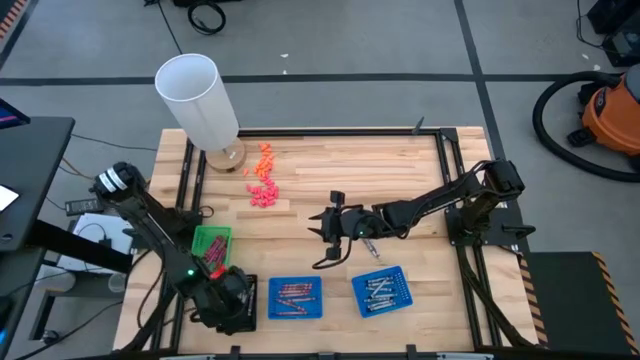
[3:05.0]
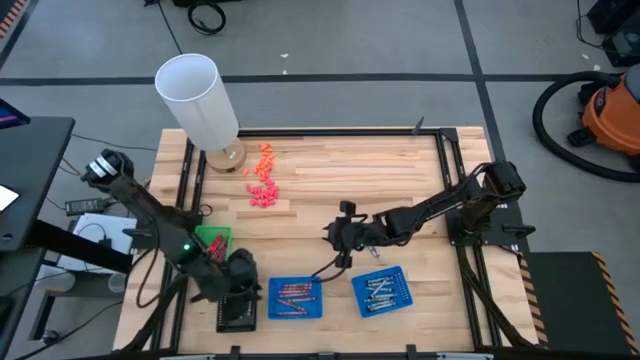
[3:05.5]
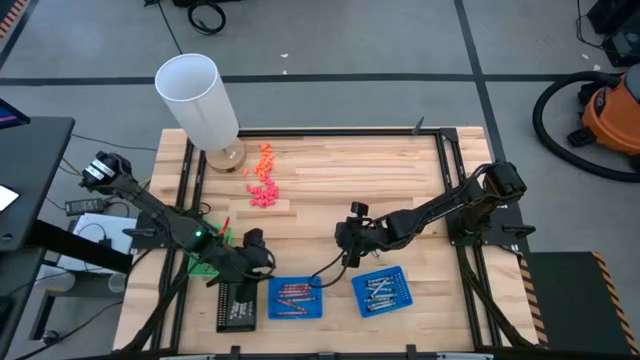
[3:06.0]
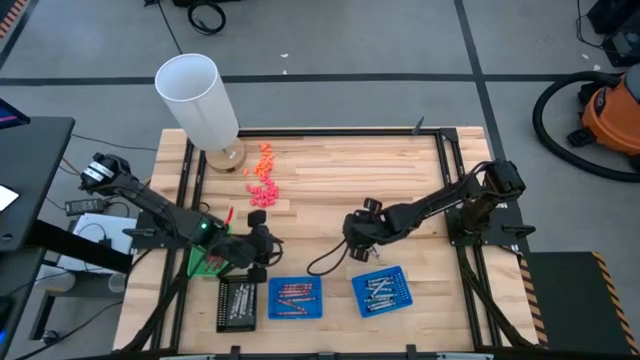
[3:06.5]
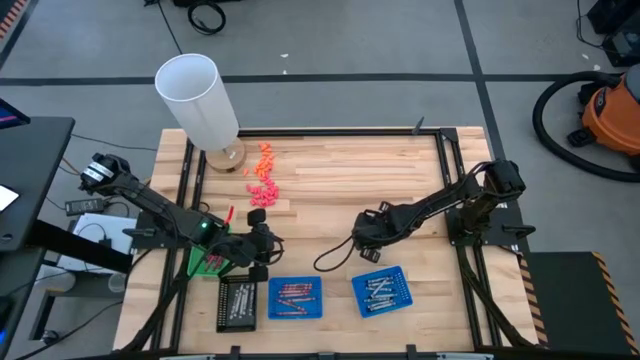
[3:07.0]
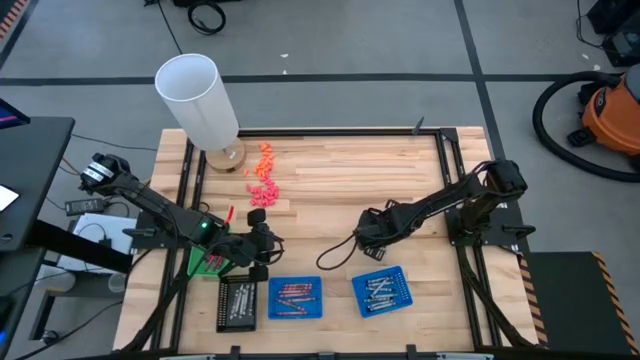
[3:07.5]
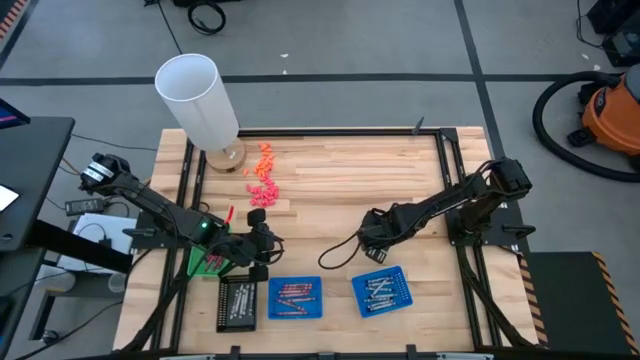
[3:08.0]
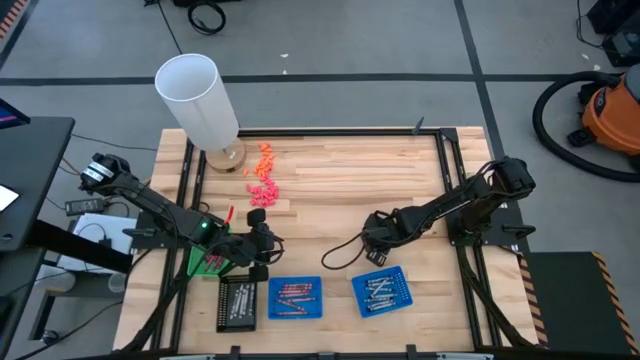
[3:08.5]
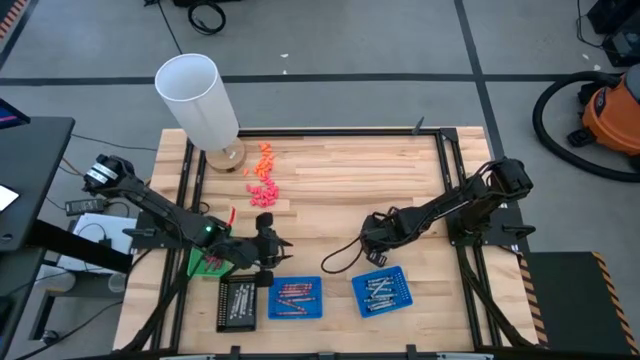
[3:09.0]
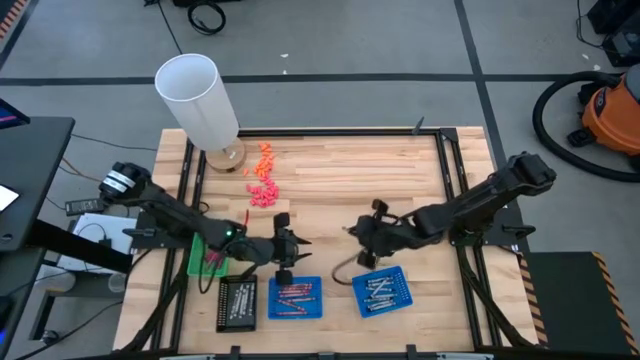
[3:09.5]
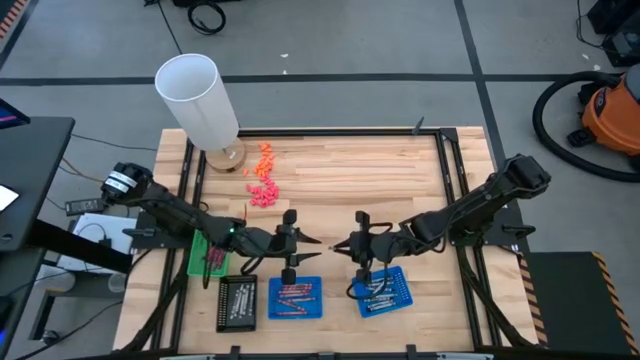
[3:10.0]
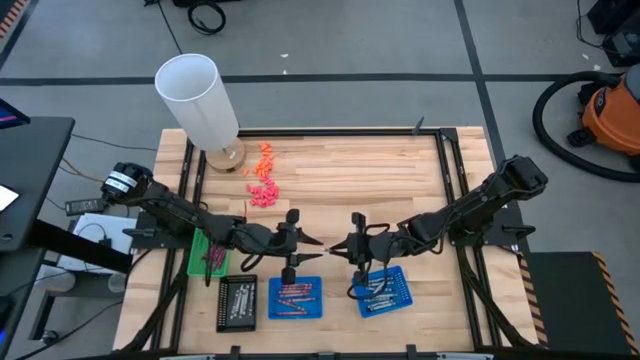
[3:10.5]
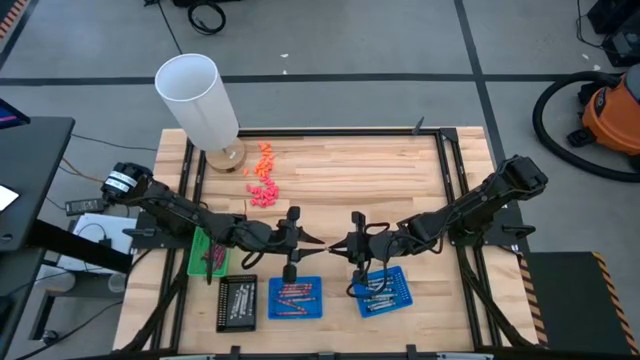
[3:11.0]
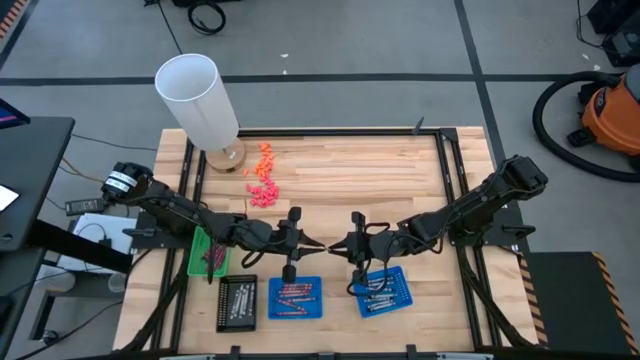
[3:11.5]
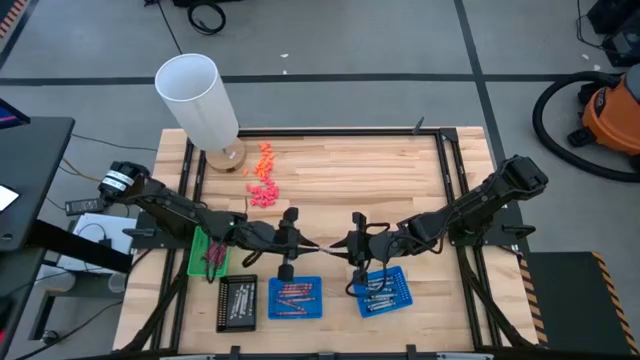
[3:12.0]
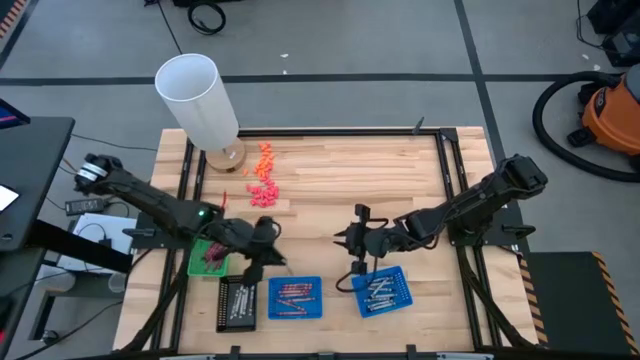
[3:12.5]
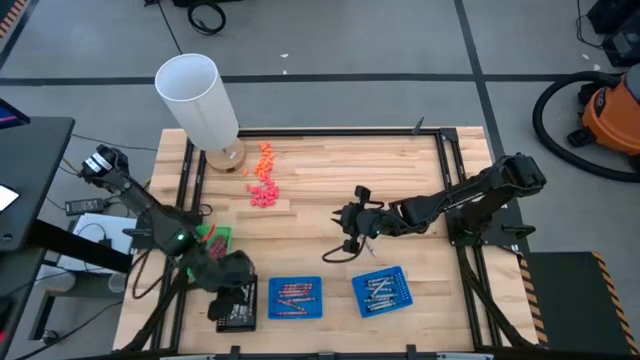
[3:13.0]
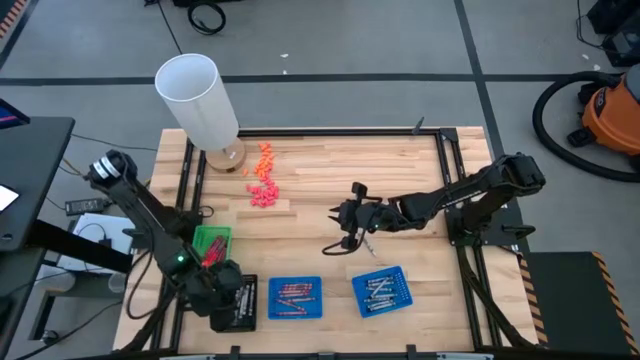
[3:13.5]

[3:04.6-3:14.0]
Task: Sort crayons
Put the white crayon into the black basket

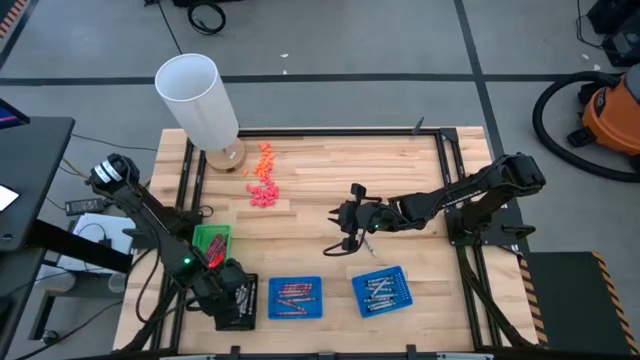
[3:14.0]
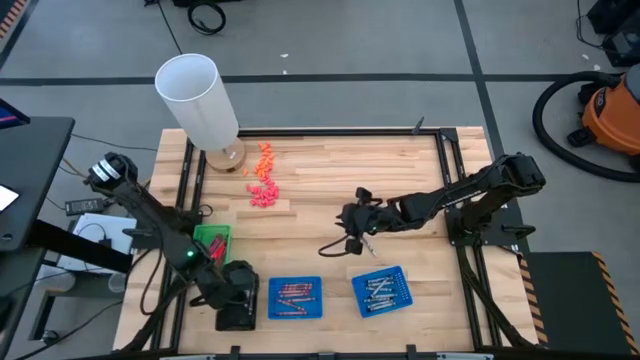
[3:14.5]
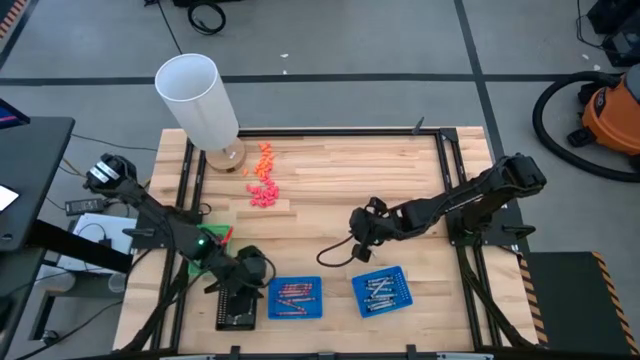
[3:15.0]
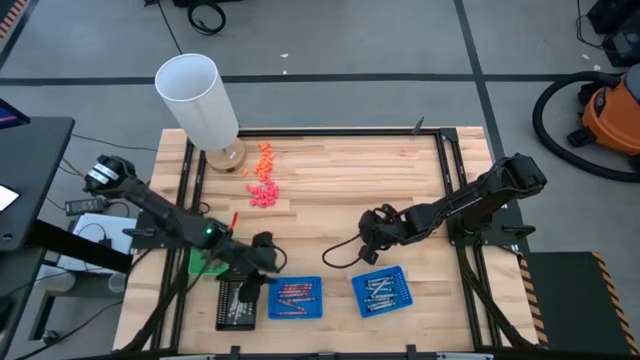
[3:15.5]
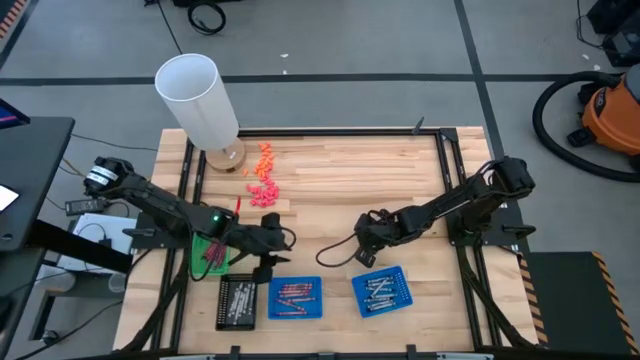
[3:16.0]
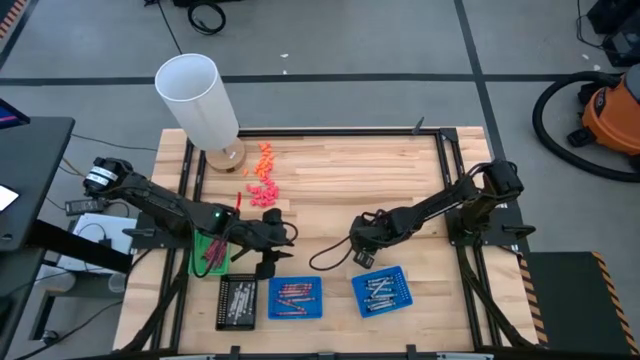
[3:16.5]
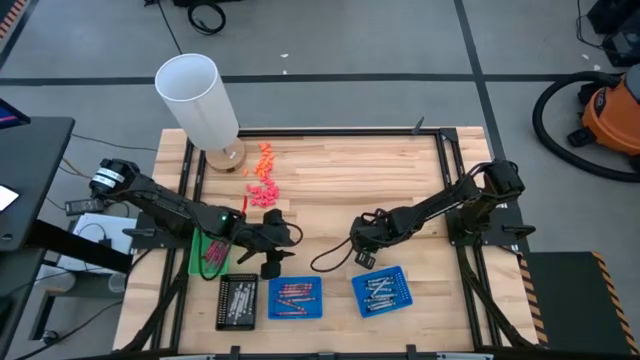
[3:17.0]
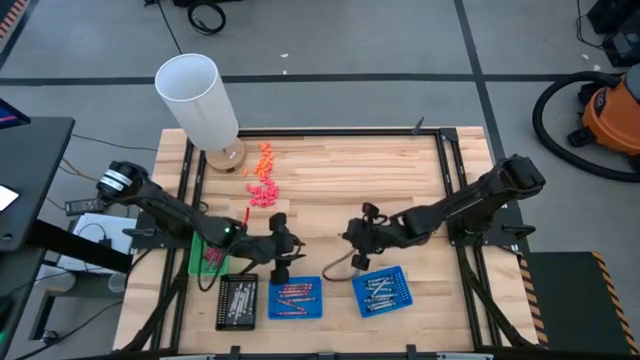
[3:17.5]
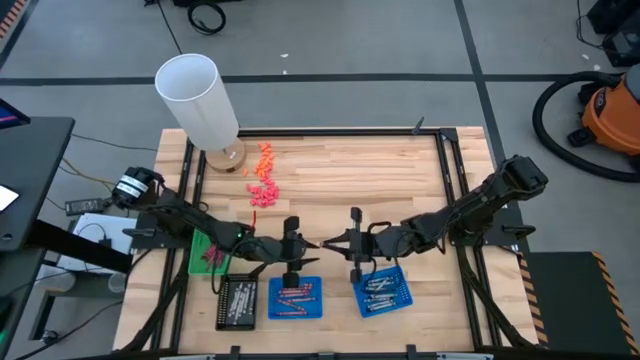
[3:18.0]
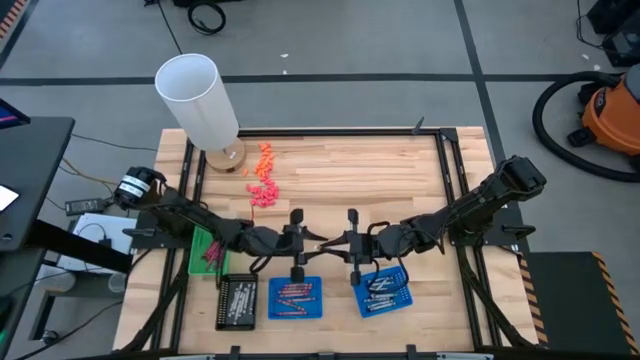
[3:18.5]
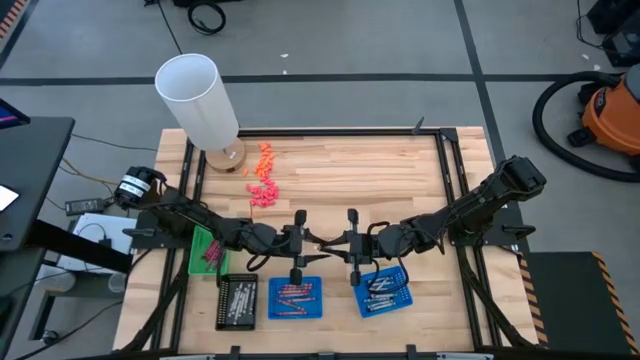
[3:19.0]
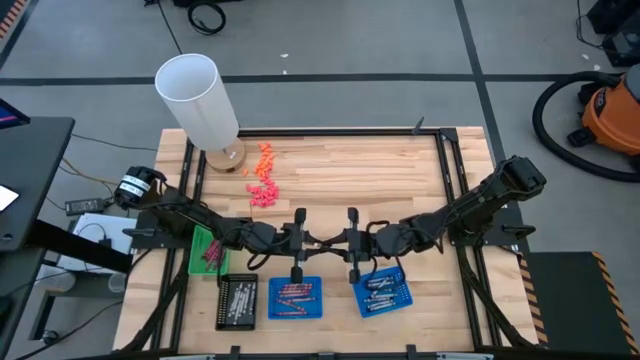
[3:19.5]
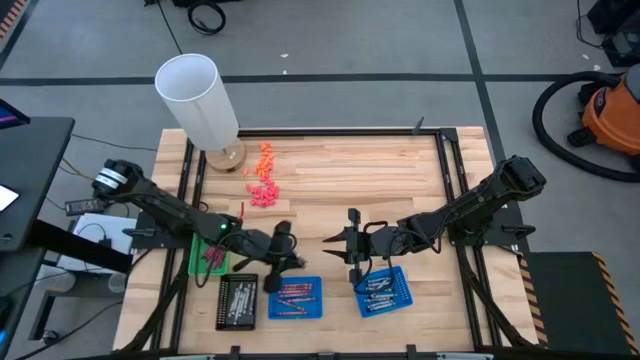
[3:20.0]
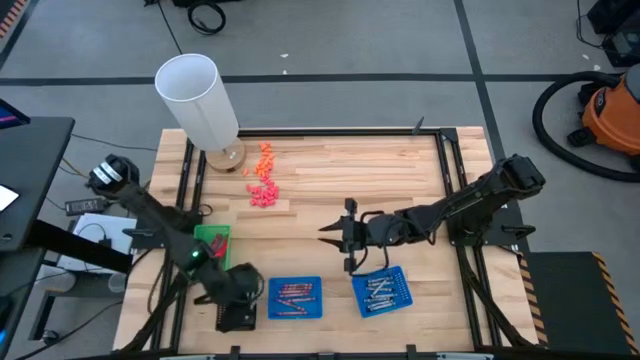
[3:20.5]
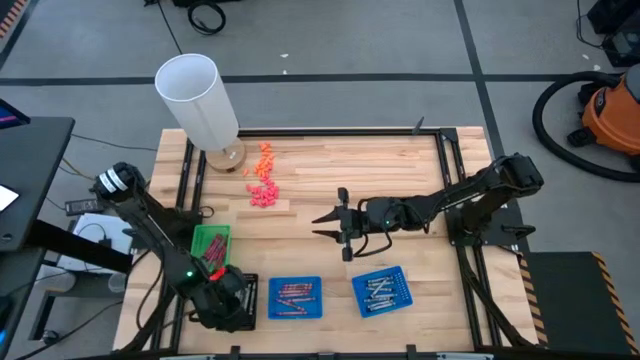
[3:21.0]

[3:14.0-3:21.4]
Put the white crayon into the black basket

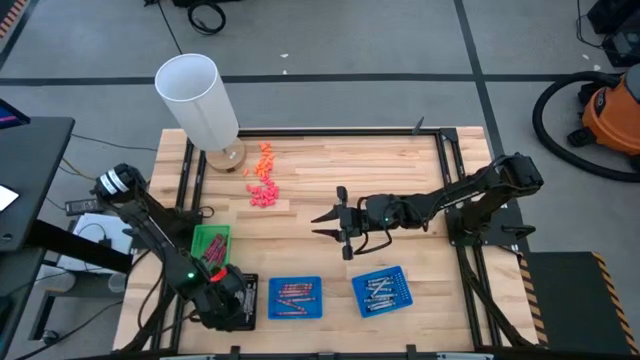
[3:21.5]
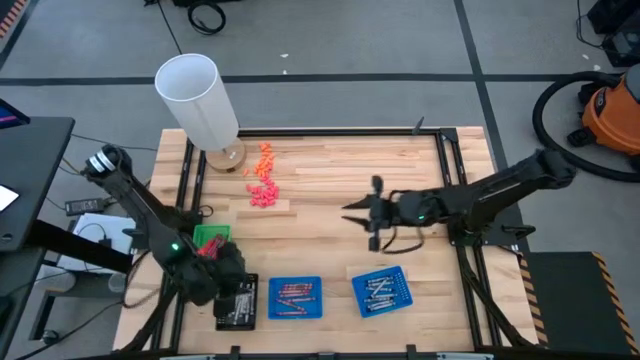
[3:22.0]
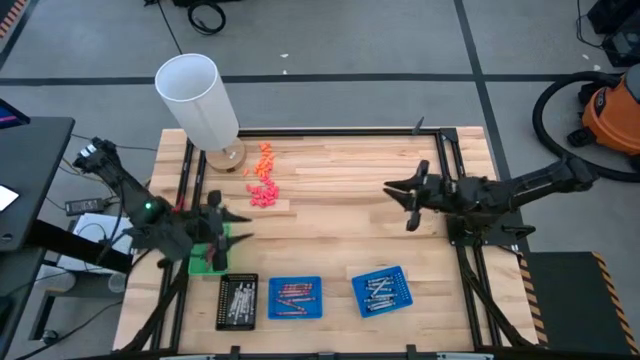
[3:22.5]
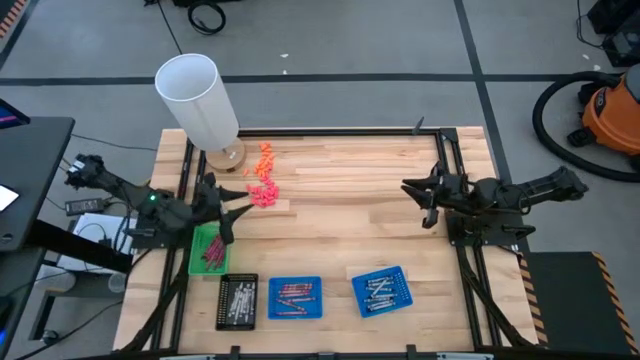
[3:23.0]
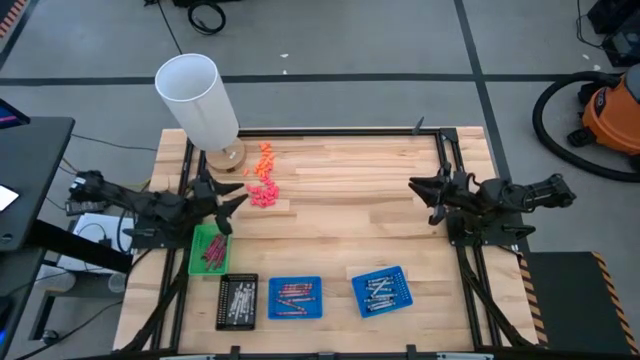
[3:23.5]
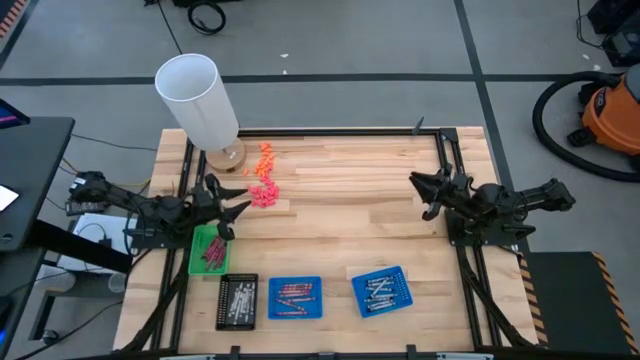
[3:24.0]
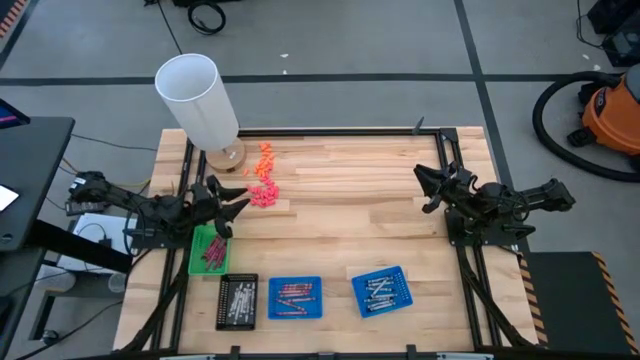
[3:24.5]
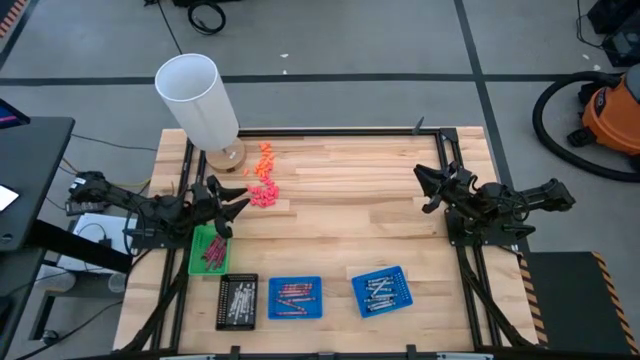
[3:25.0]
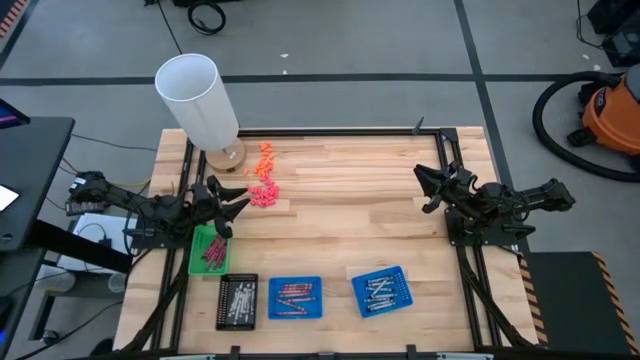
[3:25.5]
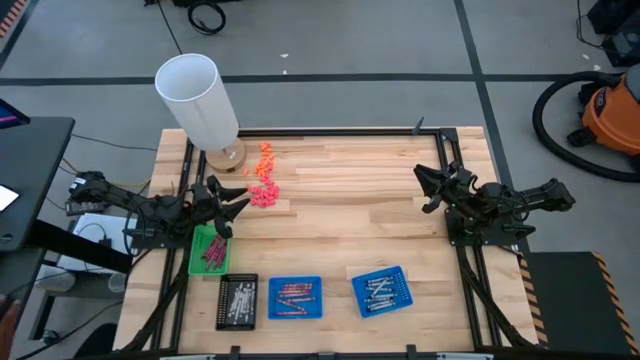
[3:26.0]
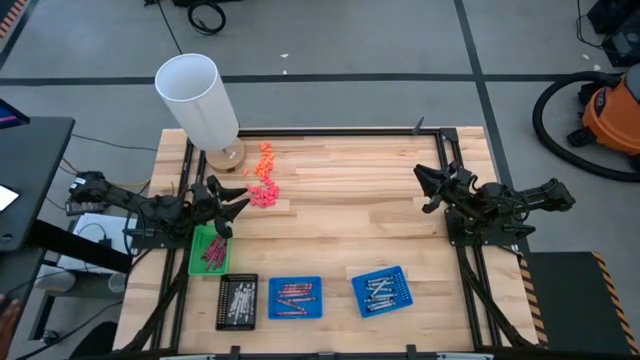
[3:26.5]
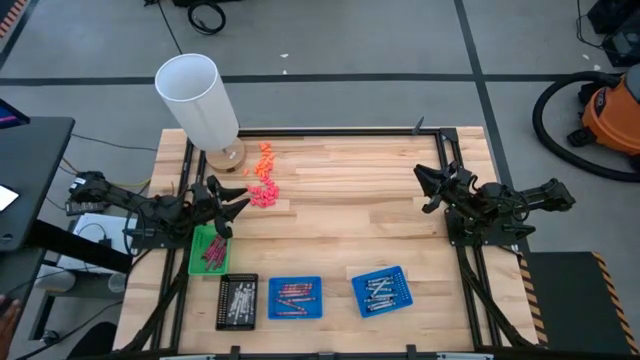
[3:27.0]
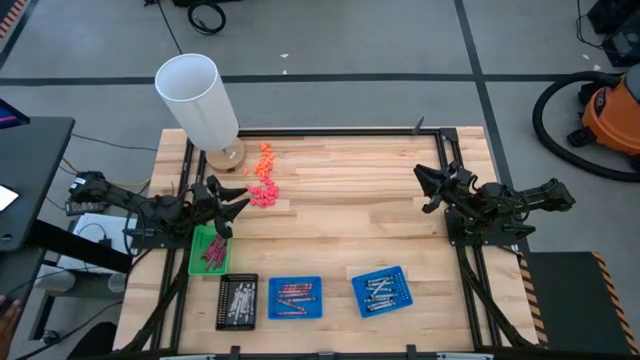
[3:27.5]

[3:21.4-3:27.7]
Return to Home Position
